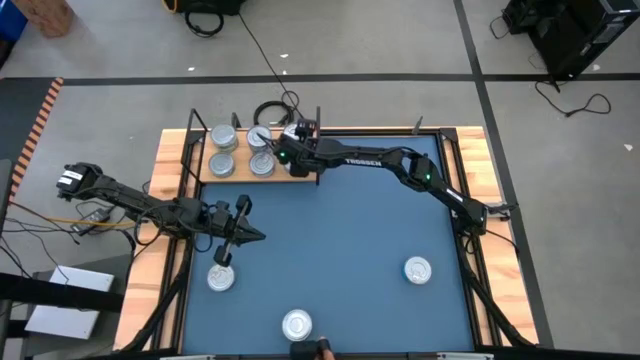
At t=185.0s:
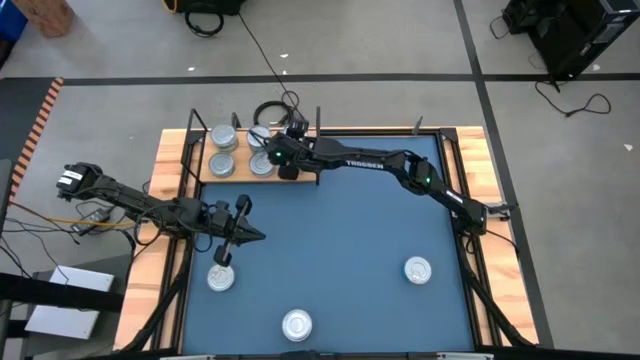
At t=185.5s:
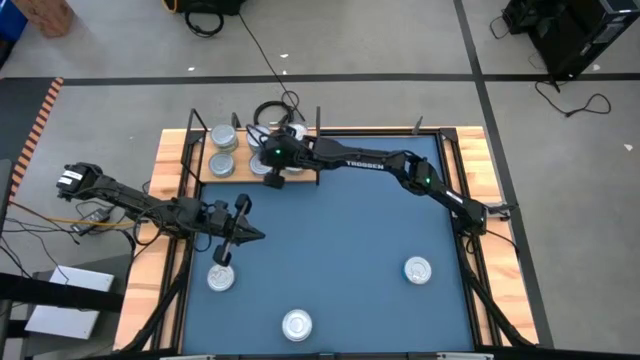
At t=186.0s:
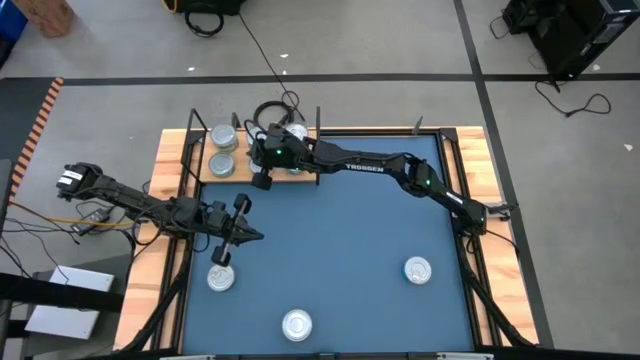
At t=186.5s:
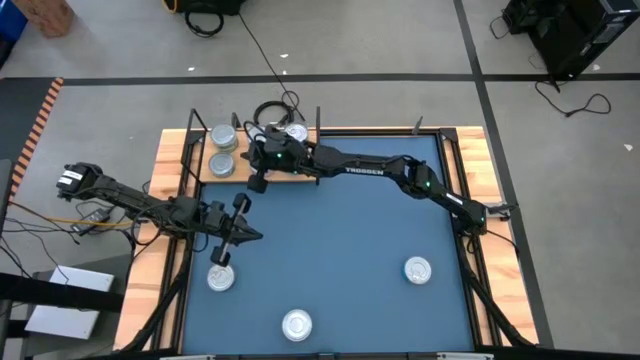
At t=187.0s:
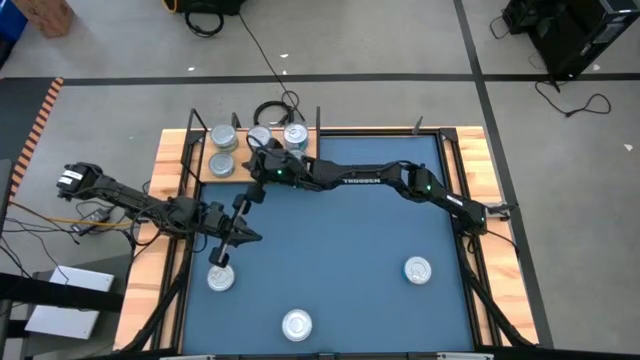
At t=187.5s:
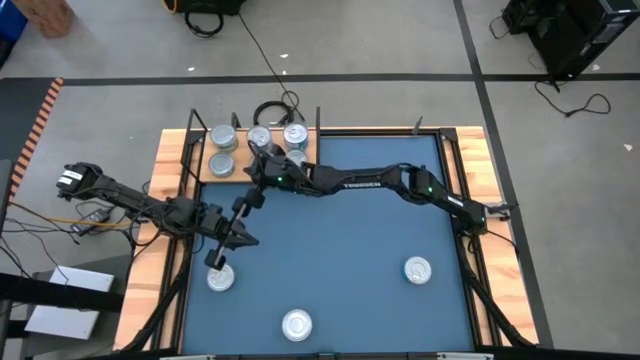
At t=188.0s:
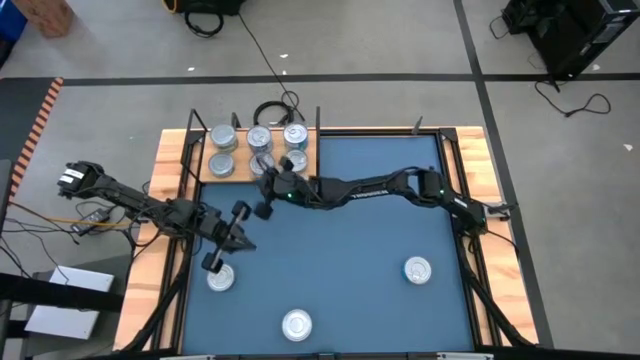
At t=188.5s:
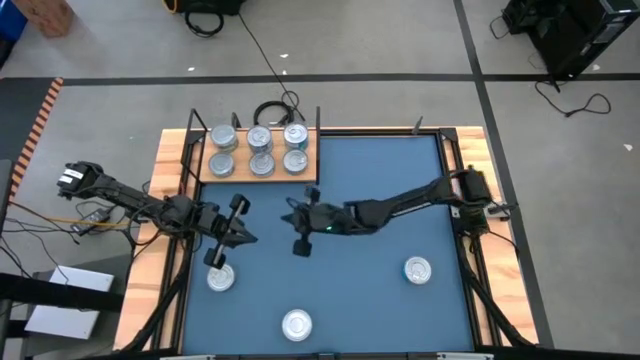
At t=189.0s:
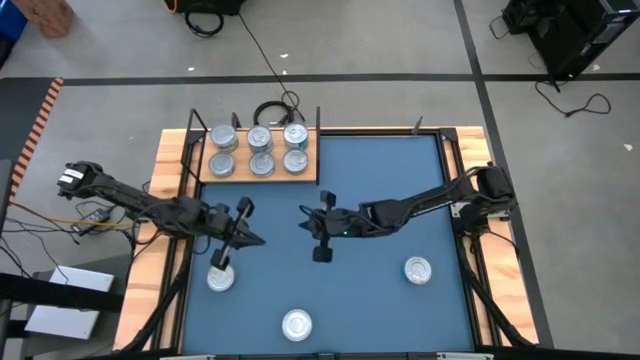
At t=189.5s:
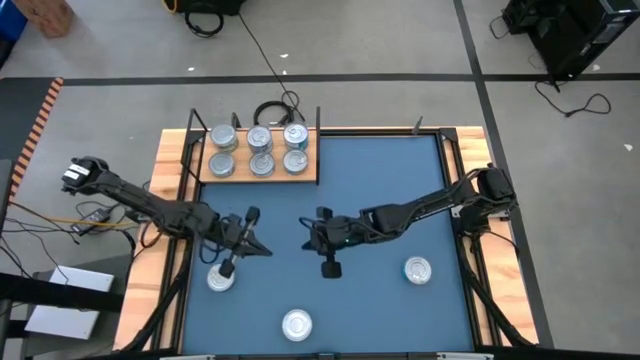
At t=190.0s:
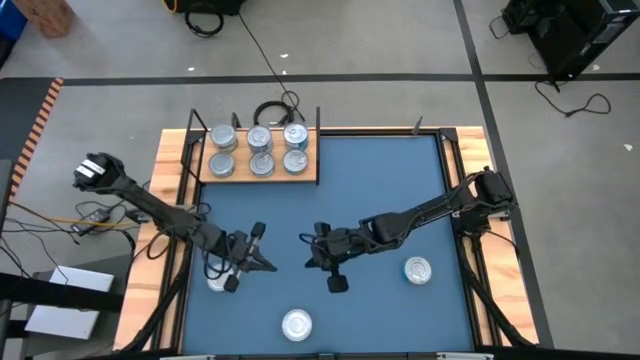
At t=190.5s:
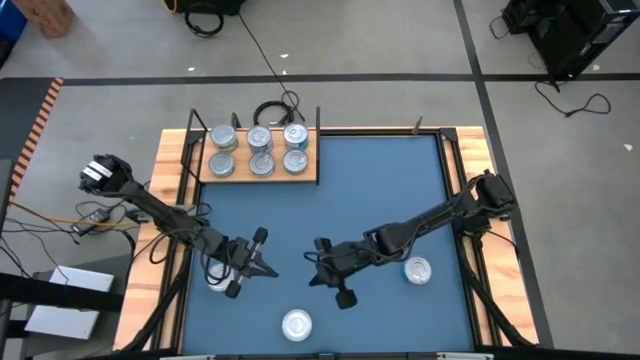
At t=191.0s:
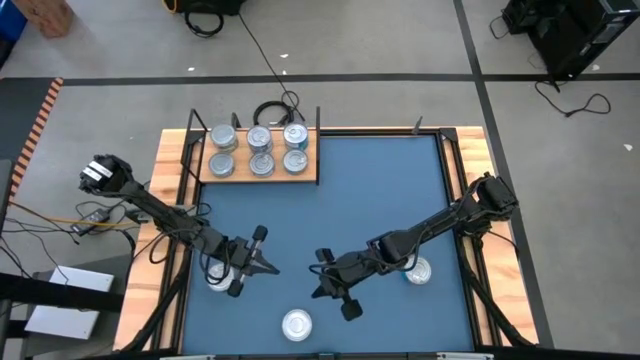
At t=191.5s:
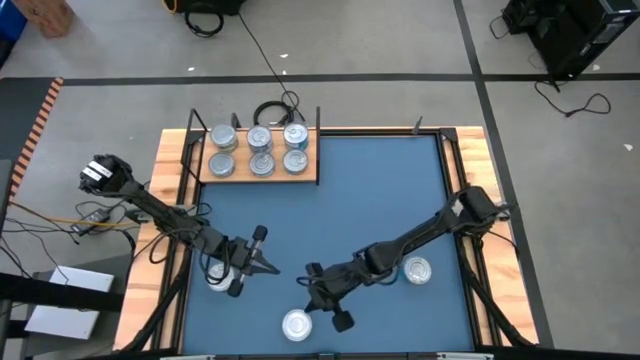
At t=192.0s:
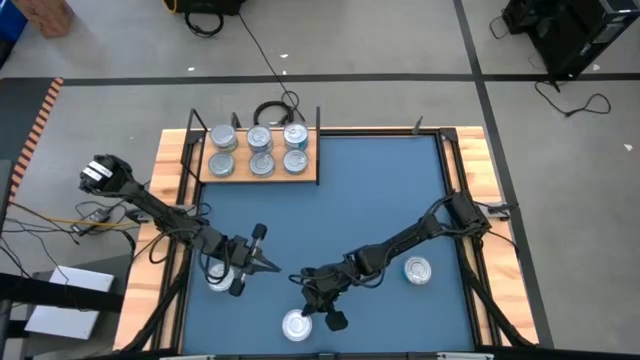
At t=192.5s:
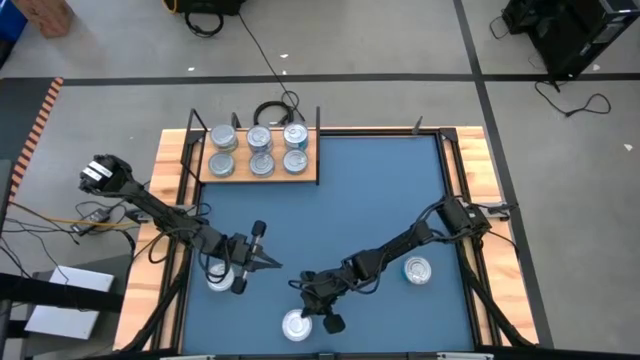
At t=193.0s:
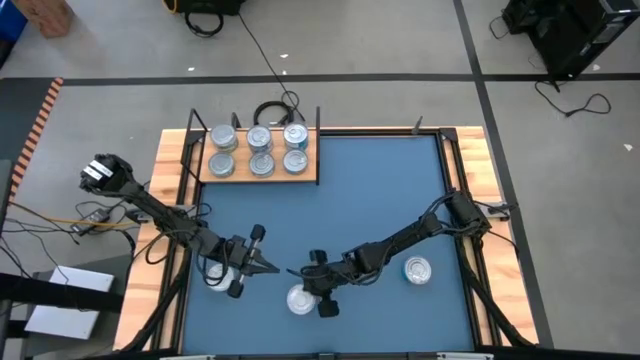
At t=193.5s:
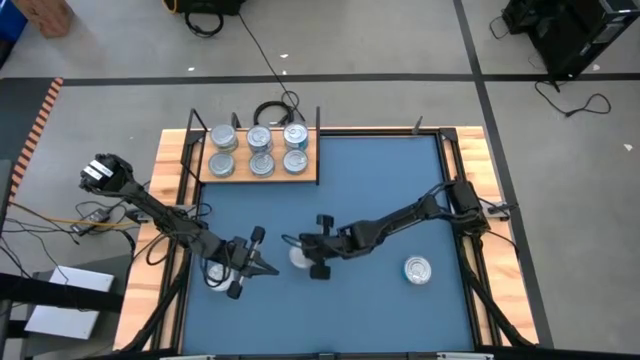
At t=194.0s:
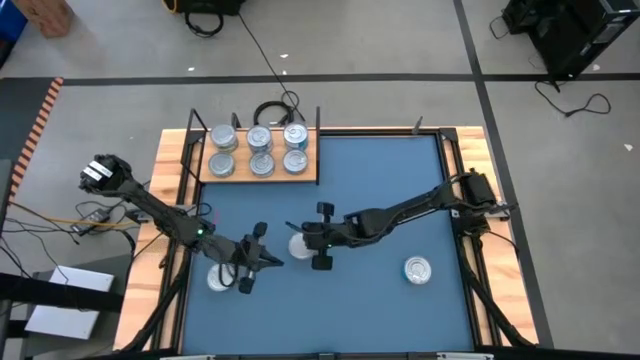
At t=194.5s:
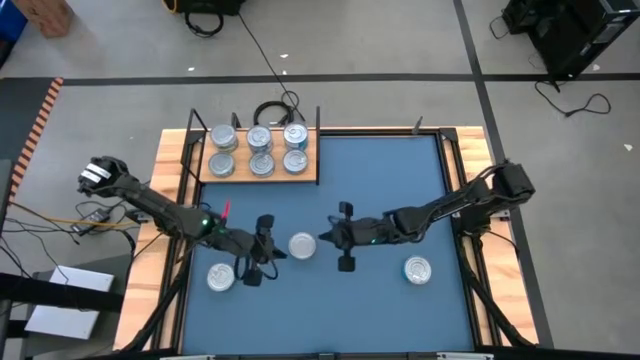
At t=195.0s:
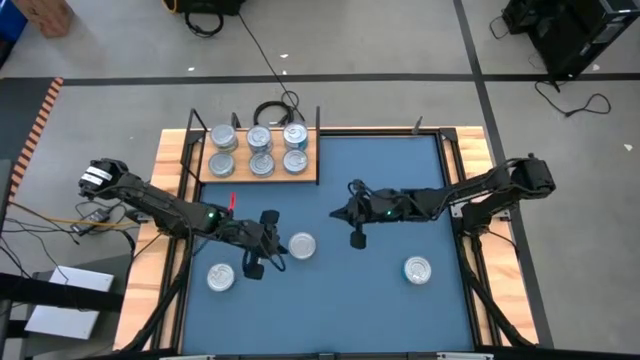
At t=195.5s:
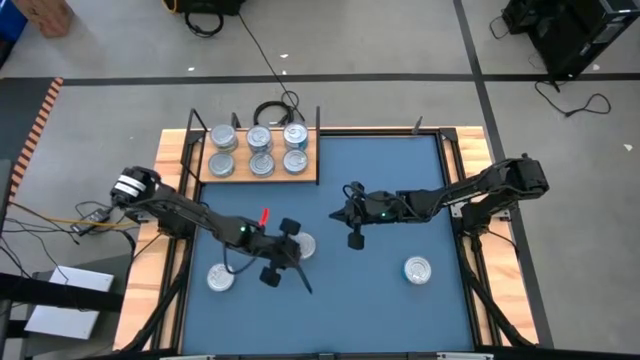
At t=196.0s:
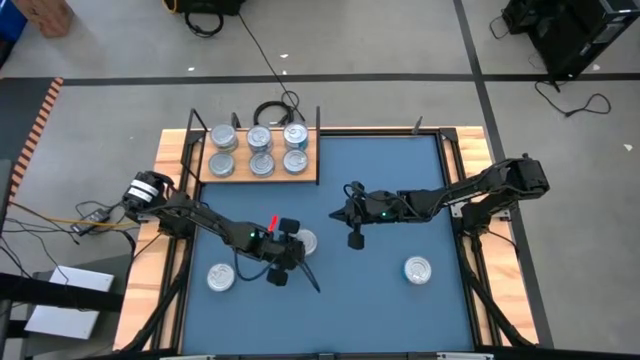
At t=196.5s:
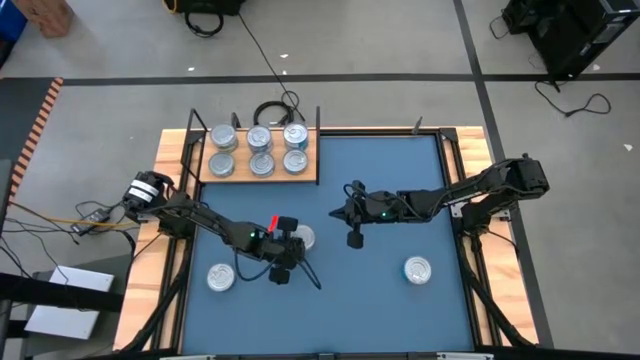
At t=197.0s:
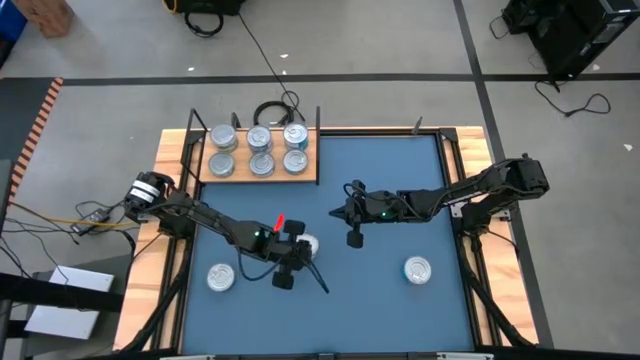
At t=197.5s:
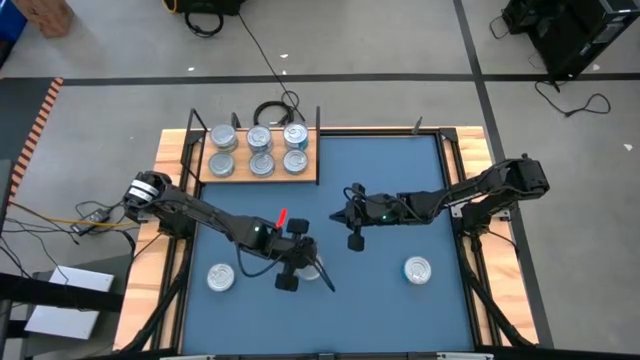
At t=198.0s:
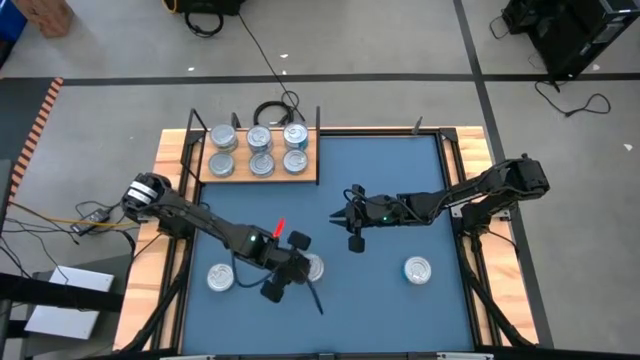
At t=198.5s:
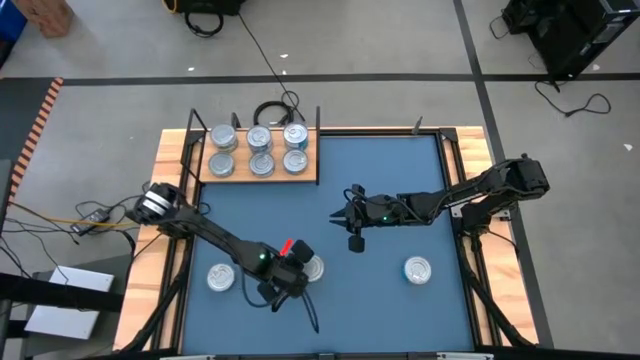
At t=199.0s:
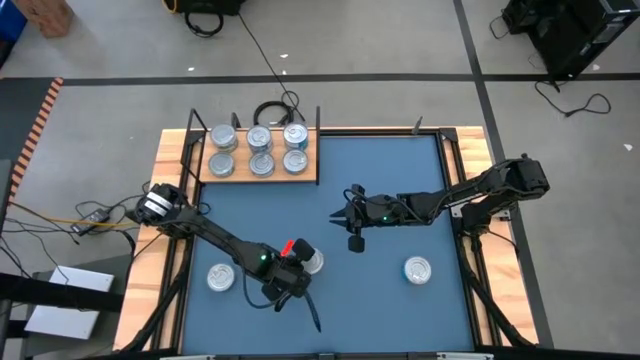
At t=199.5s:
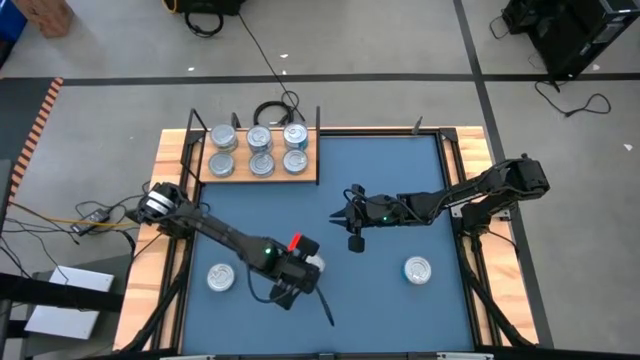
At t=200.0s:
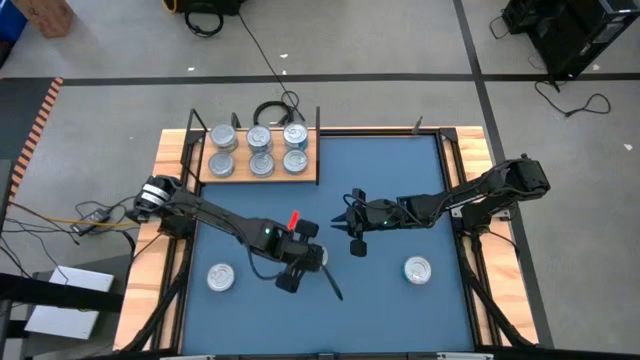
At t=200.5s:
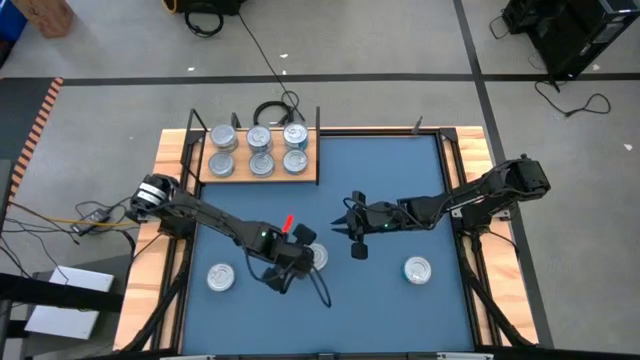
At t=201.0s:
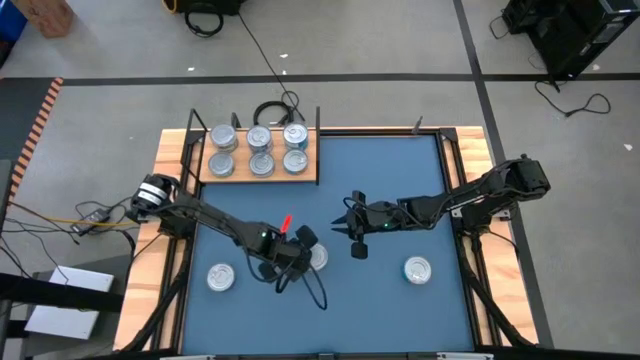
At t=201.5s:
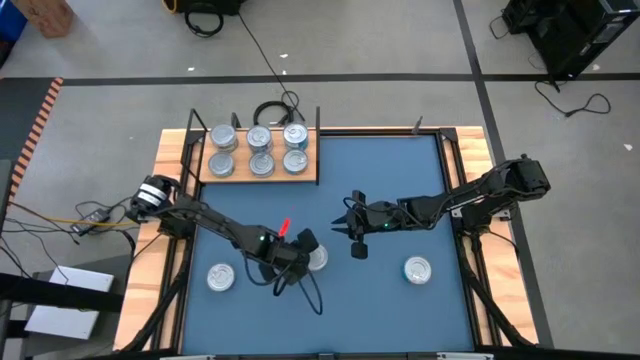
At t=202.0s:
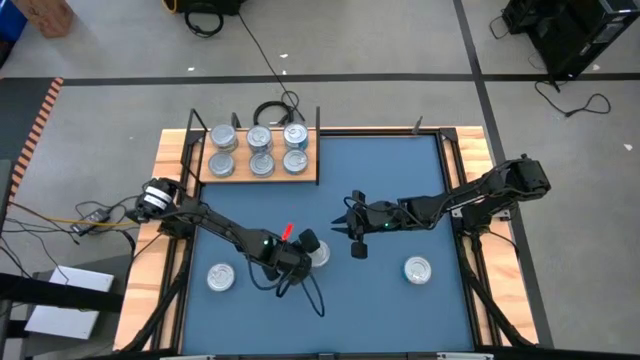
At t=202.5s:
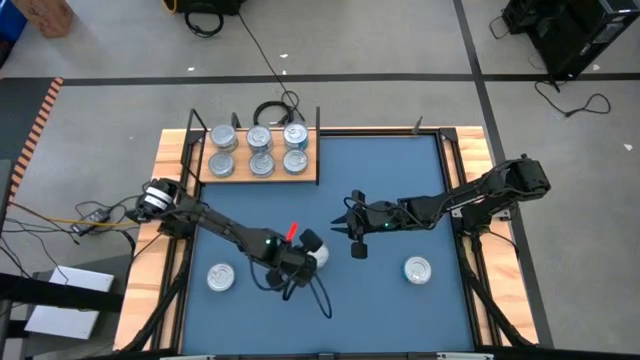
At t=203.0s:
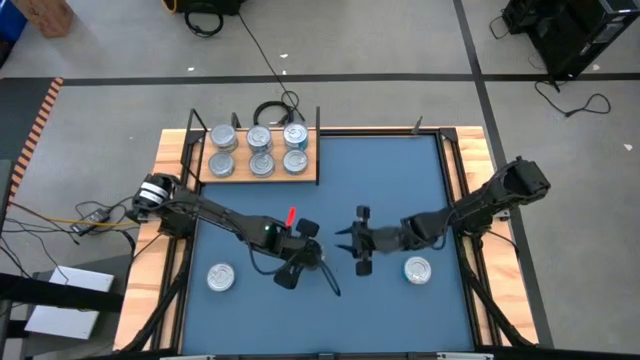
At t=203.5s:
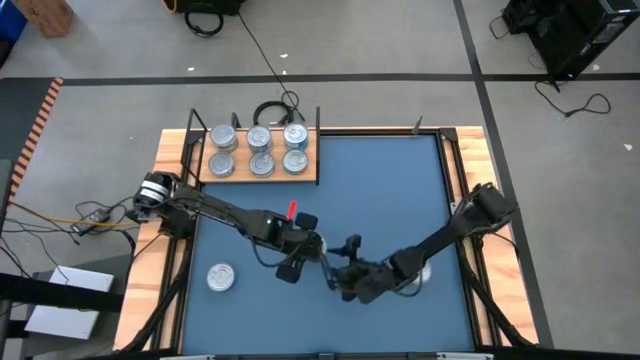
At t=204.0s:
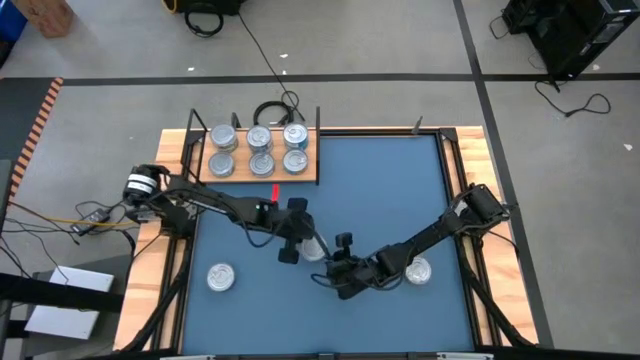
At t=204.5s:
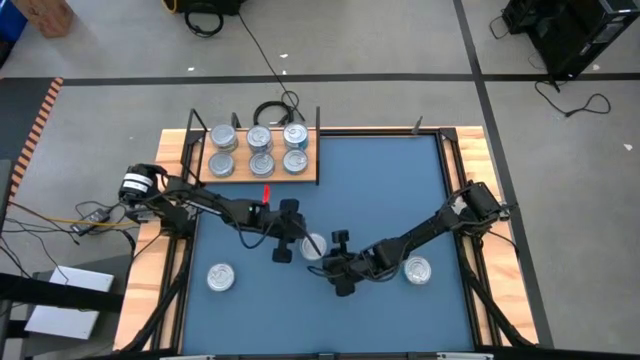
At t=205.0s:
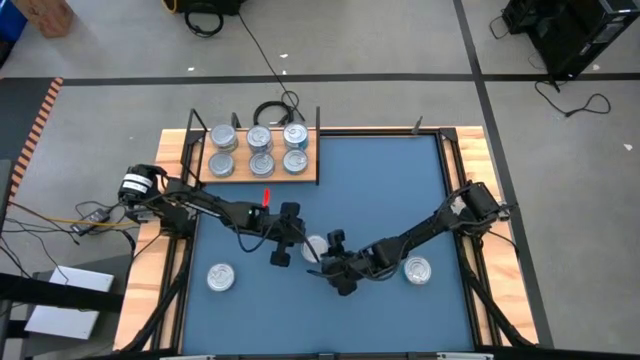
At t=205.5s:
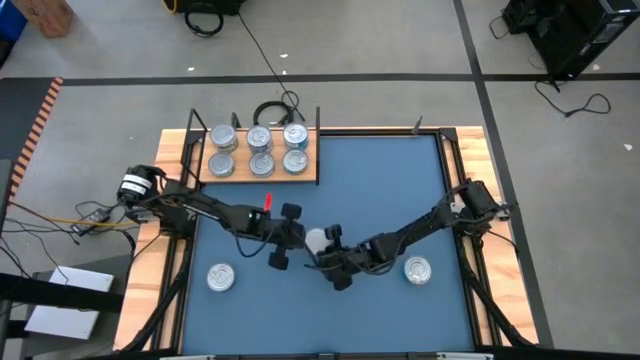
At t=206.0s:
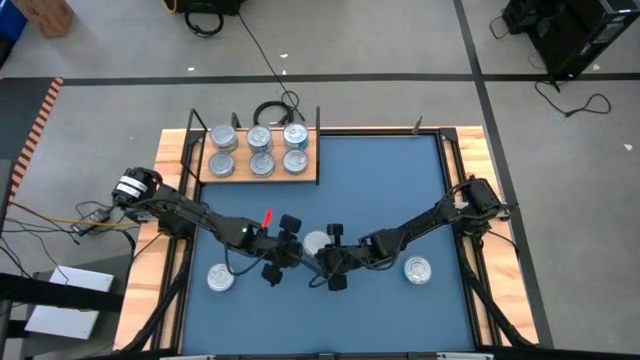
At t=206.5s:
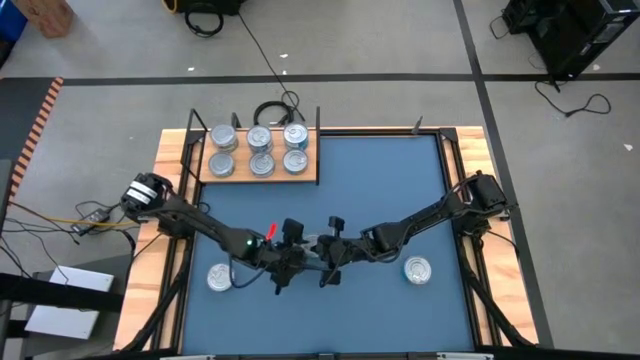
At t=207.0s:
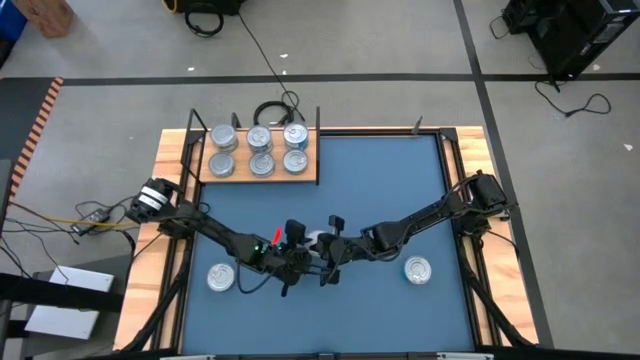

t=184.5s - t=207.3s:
Task: Stack canned seafood by type on shelf
Stack the green tuna can on top of the green tuna can on the shelf
